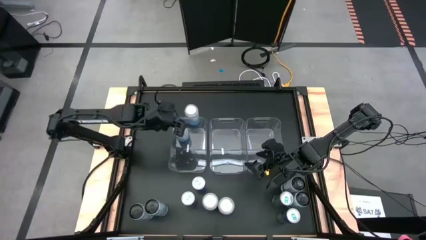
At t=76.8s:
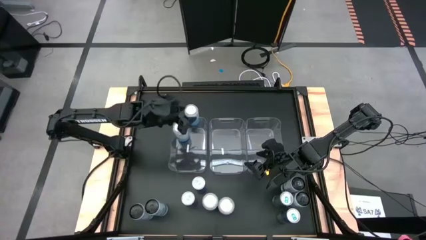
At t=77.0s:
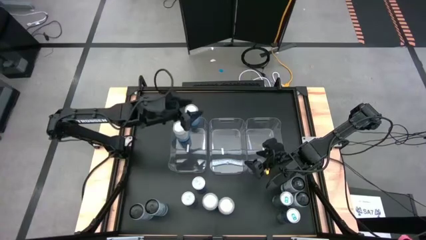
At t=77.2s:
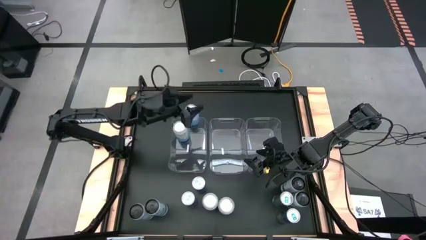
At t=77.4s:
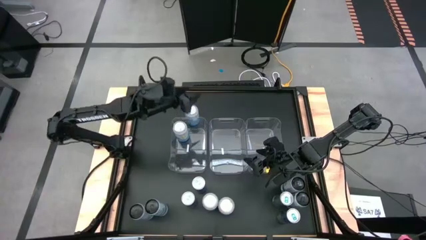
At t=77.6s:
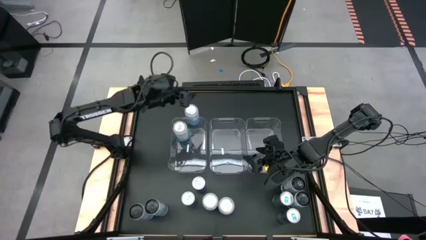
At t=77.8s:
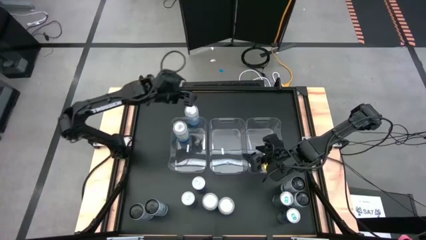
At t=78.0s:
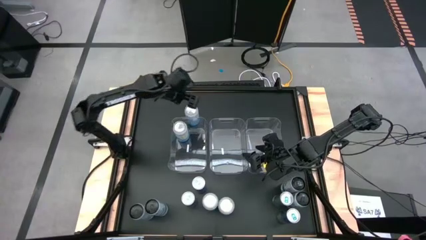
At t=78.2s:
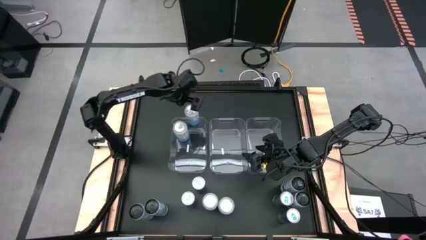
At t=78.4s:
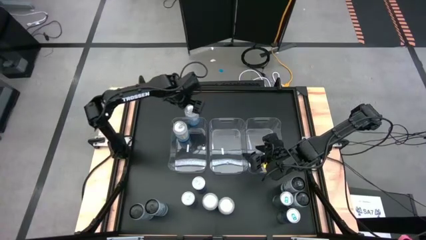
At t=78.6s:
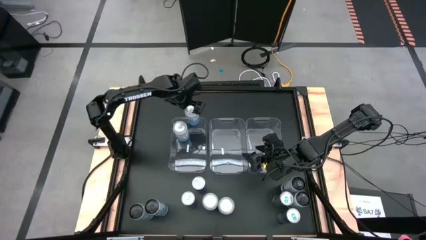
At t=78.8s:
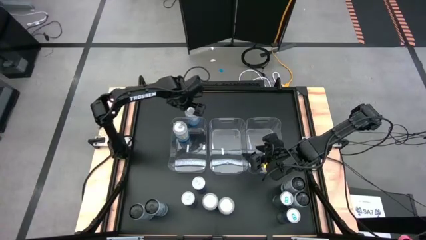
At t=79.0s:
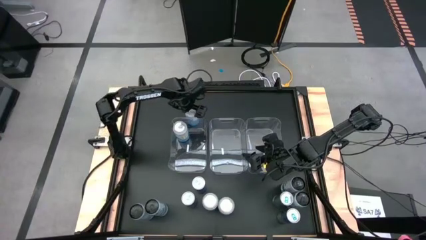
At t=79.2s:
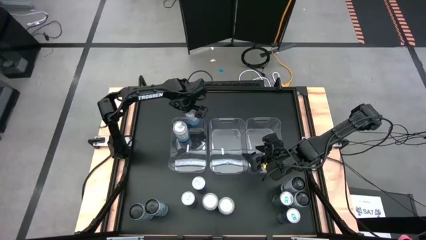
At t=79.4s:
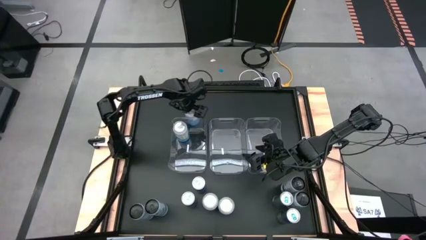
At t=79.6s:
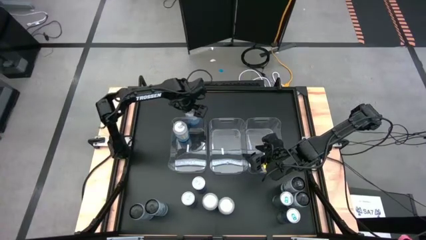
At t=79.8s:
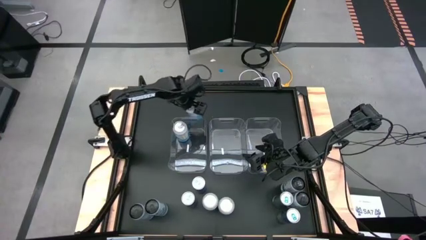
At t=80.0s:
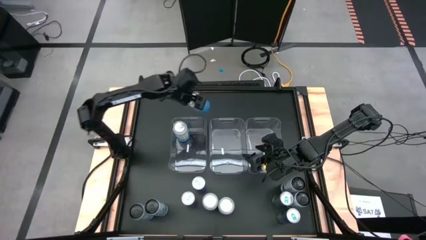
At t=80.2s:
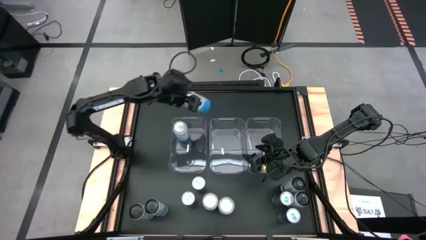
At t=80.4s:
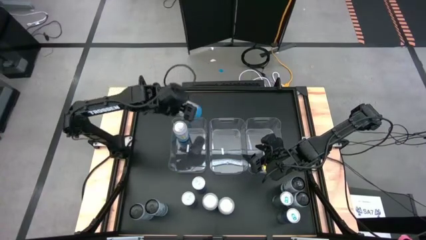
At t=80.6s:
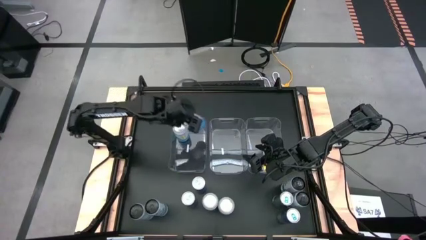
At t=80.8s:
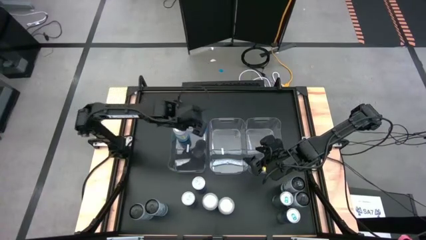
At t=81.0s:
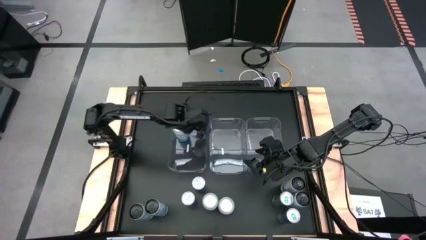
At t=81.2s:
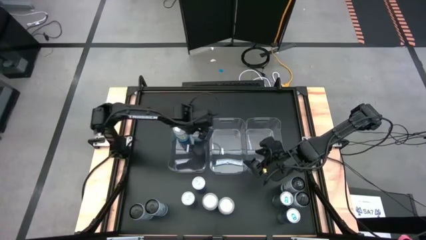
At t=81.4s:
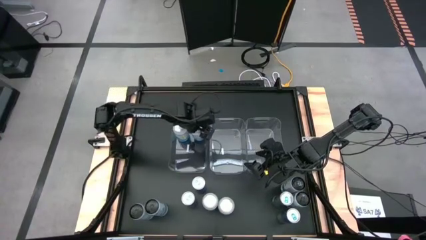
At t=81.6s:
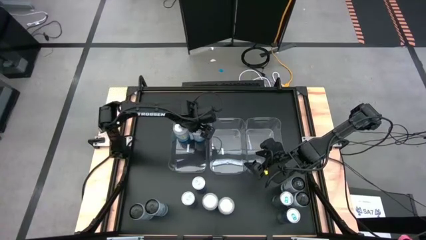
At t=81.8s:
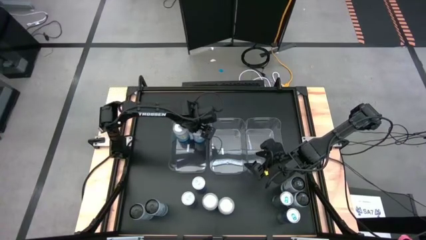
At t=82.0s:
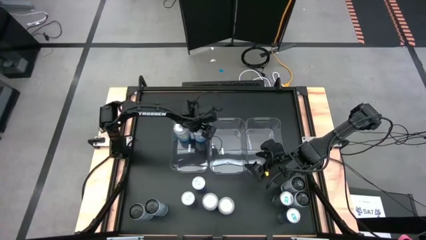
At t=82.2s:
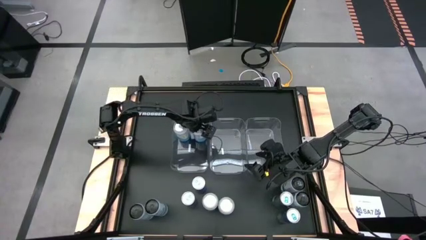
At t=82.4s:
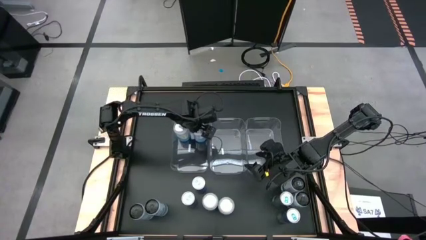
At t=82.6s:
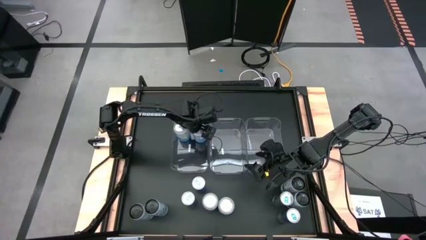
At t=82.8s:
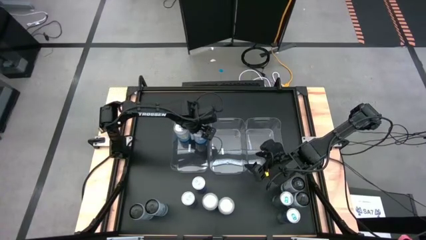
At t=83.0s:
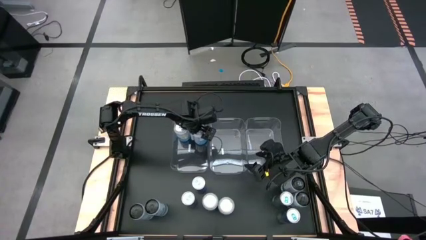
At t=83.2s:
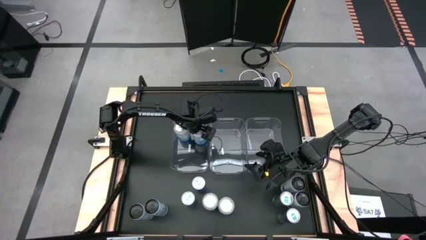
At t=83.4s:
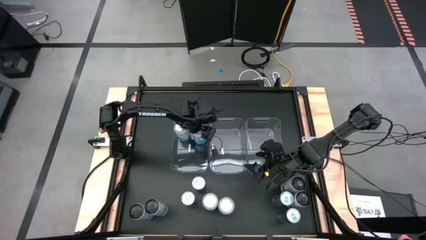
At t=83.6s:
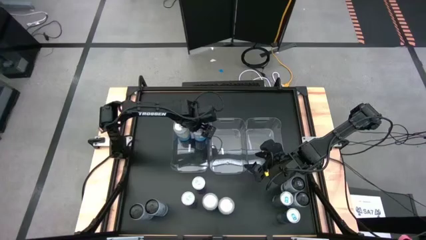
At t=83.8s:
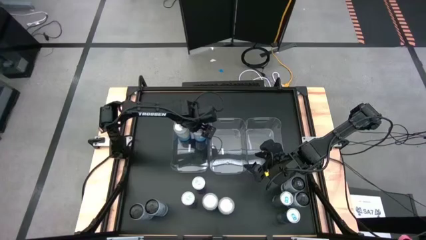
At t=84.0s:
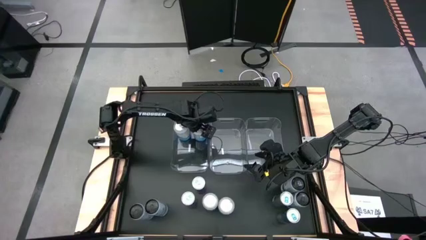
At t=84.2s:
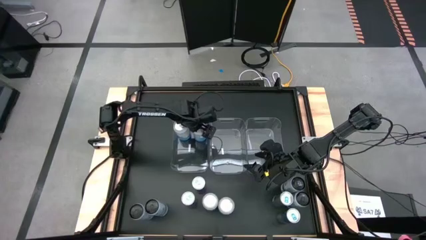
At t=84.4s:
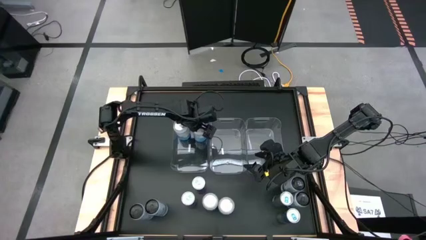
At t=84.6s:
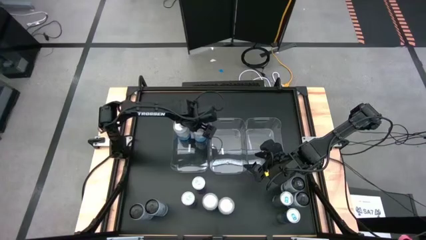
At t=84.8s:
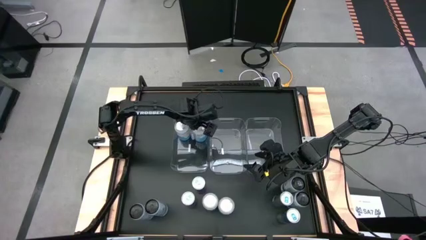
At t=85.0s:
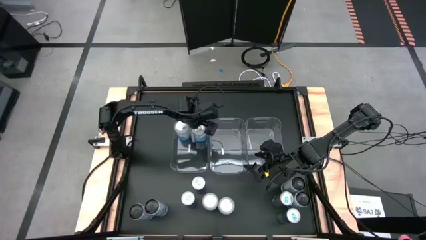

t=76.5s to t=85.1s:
Task: Sort soda cans
Put the top blue-white soda can into the left transparent bin

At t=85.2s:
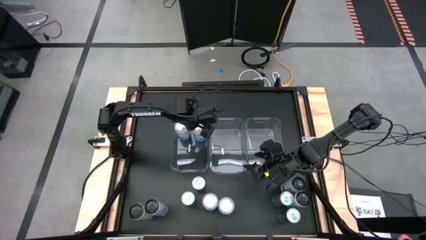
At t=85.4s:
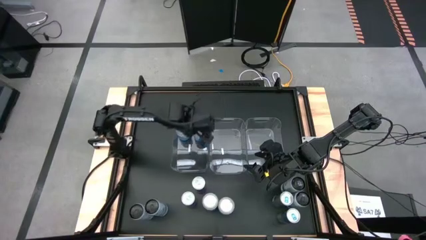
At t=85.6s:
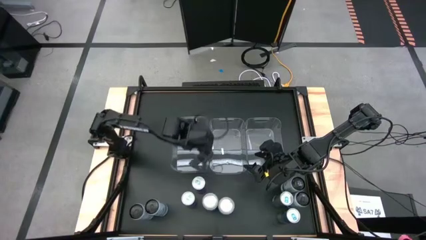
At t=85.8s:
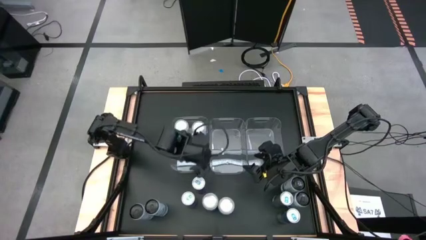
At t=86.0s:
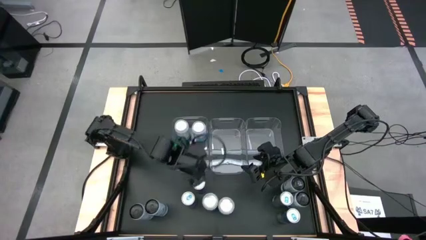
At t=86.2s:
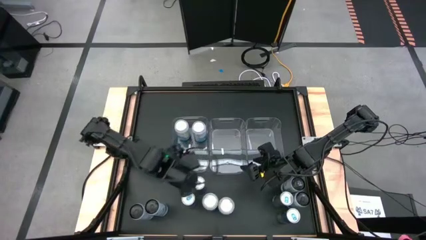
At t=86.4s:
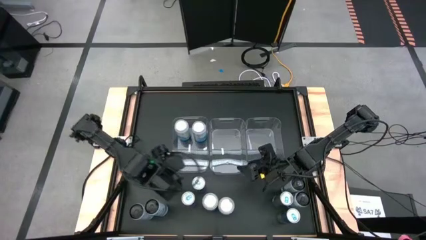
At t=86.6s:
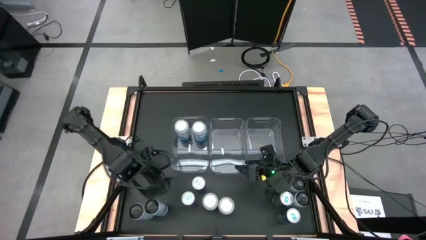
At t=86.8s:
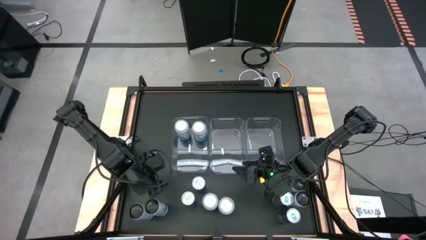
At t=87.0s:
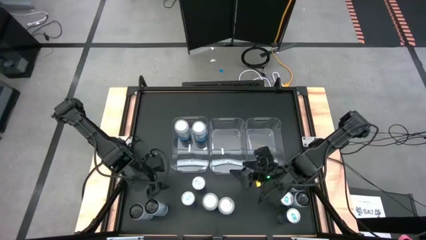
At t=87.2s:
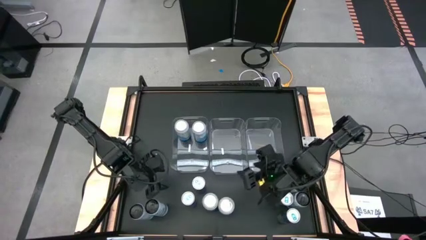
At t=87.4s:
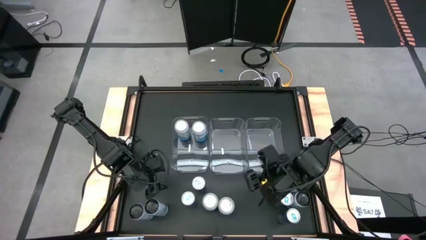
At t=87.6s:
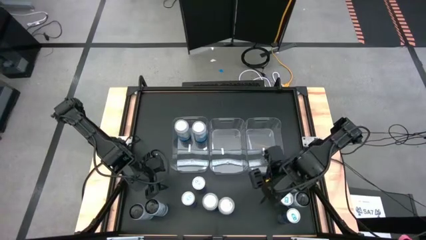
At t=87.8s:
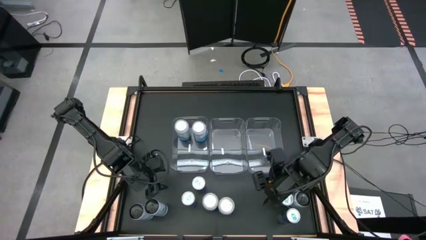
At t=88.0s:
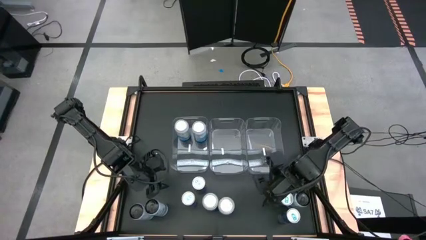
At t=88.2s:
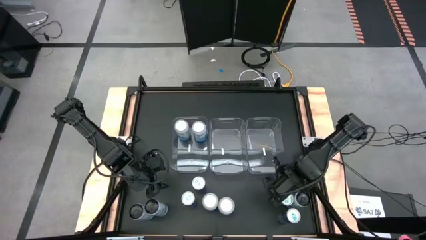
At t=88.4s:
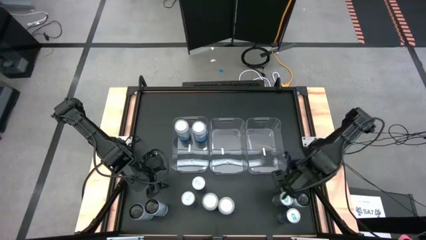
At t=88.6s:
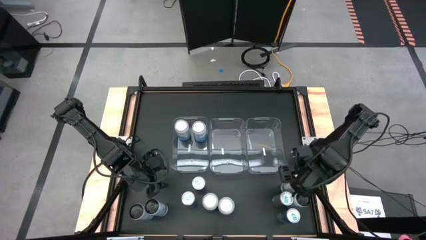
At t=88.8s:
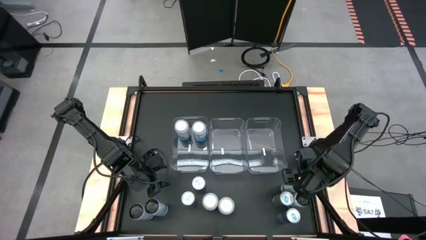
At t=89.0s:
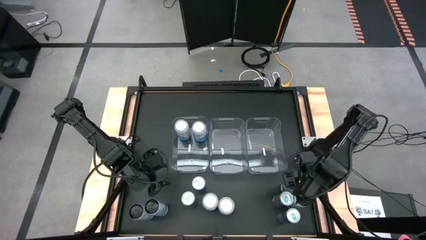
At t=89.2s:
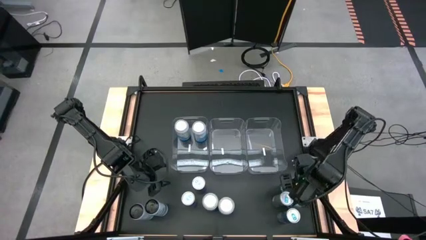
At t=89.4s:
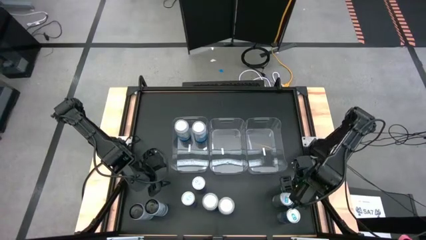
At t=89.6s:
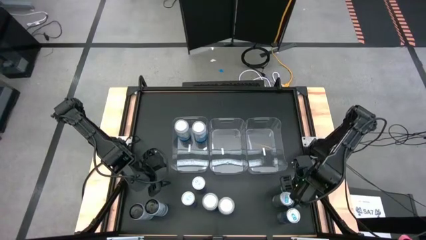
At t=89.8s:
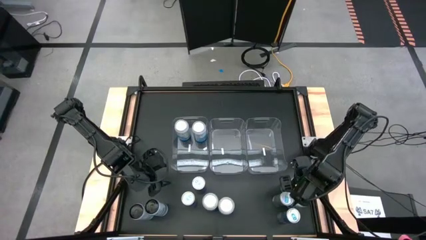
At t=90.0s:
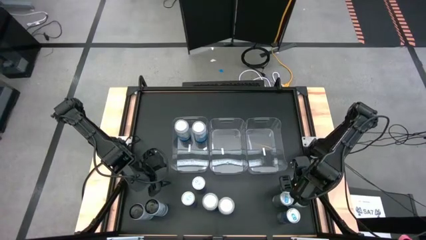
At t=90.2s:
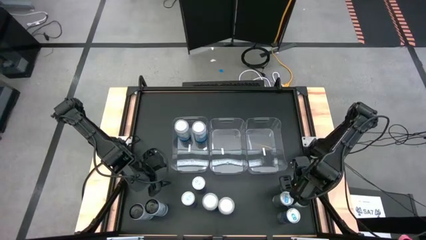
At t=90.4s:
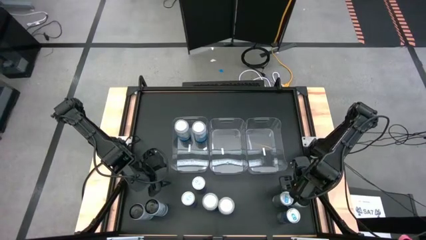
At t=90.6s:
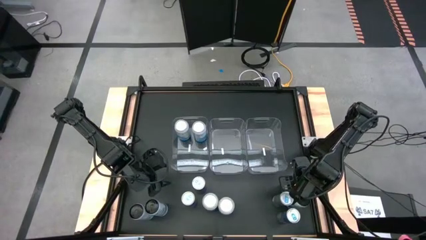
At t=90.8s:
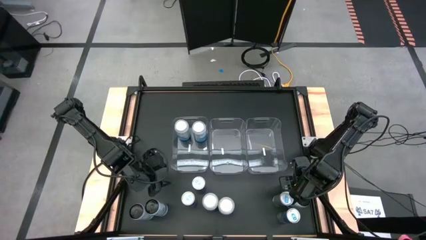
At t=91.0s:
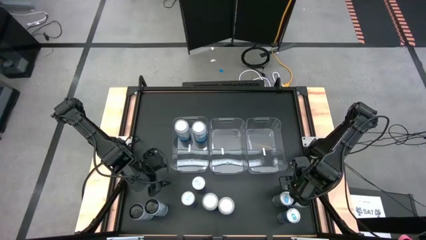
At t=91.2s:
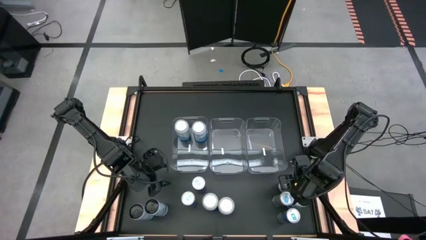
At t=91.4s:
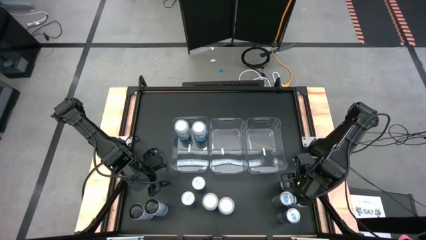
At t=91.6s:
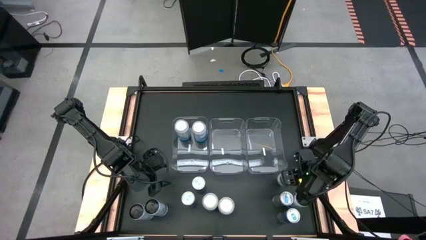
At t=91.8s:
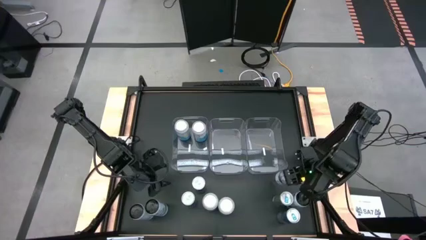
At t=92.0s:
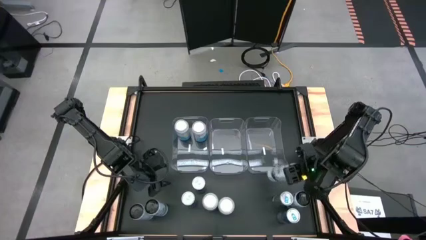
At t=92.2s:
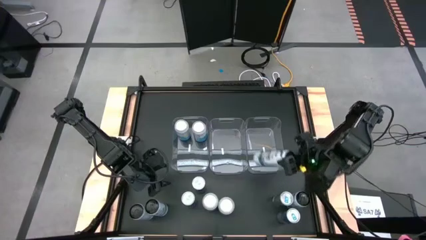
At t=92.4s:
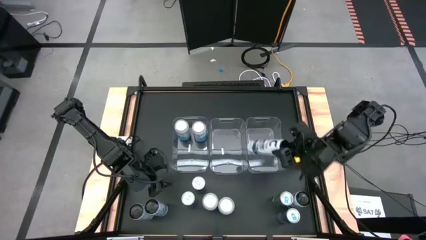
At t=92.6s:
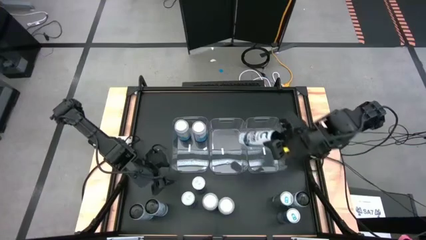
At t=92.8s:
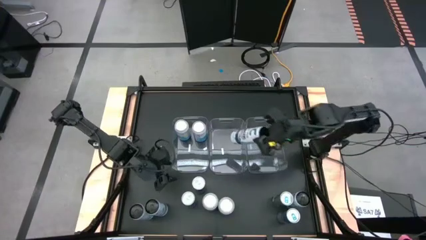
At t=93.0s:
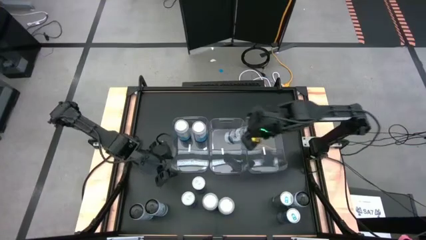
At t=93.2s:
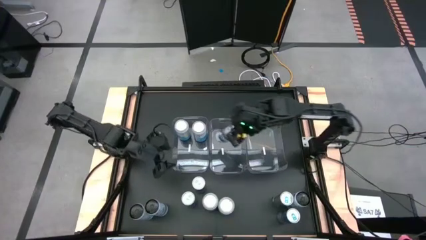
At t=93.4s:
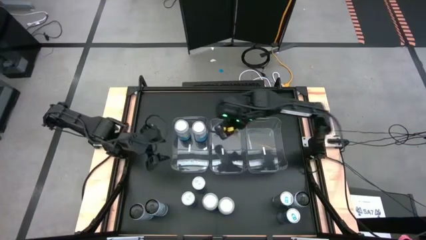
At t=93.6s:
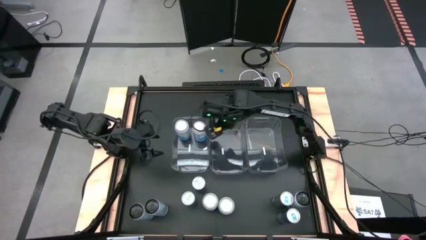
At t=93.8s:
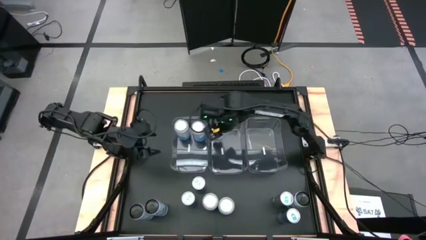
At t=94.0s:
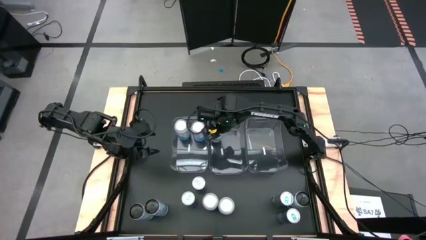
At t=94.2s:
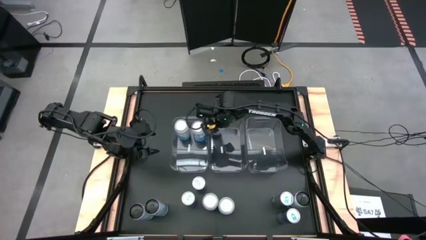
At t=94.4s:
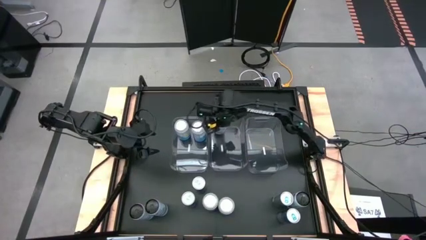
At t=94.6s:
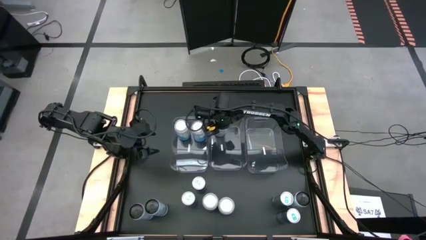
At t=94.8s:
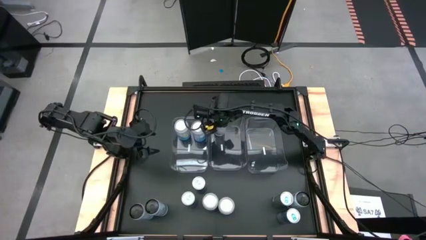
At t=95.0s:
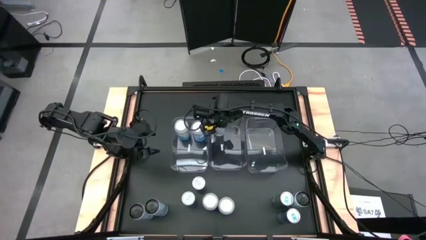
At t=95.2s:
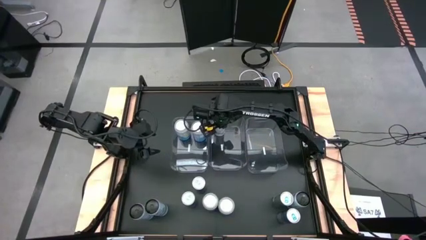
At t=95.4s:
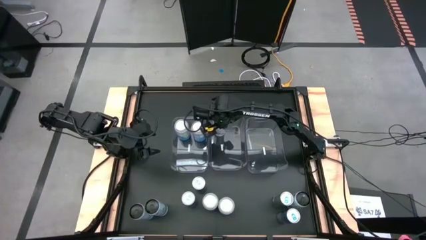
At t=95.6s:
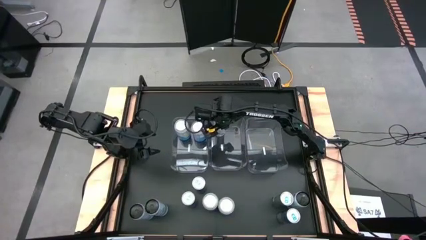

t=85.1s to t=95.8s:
Put the top white soda can into the middle transparent bin
